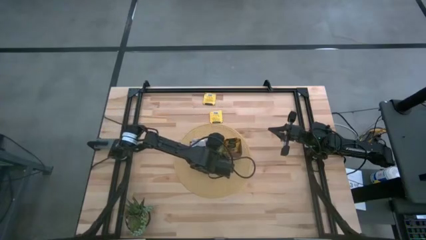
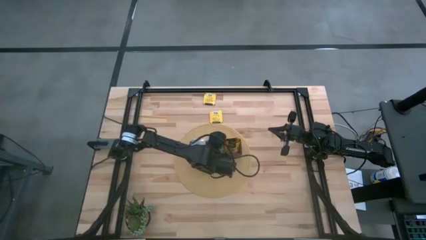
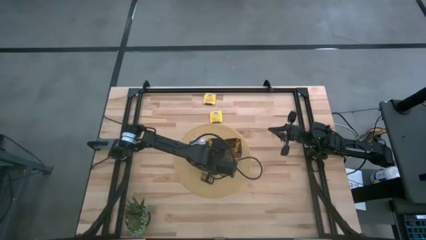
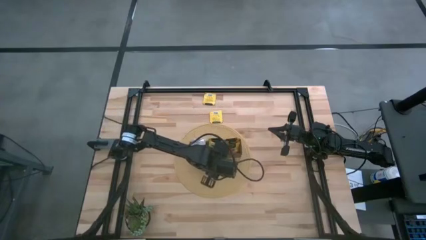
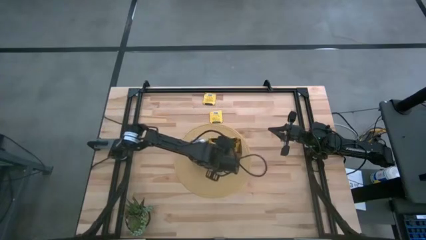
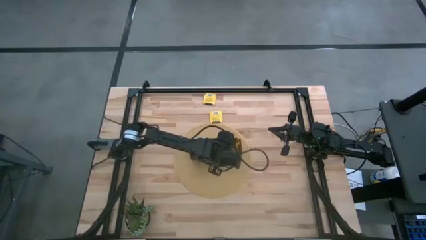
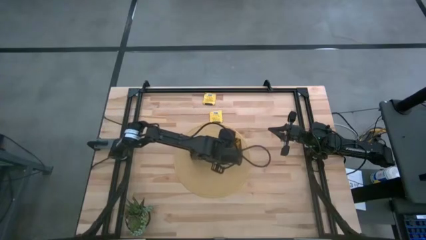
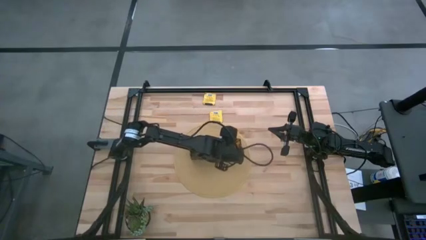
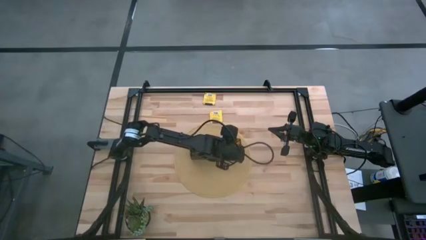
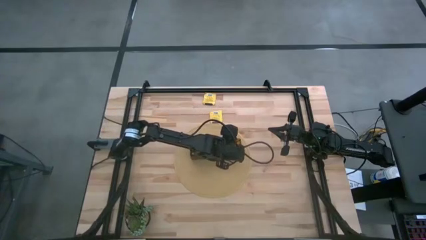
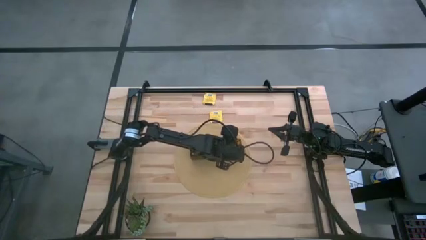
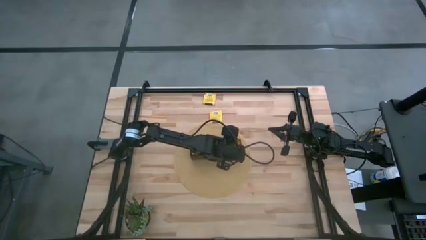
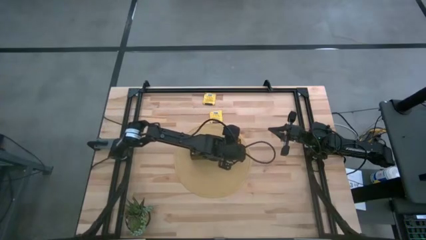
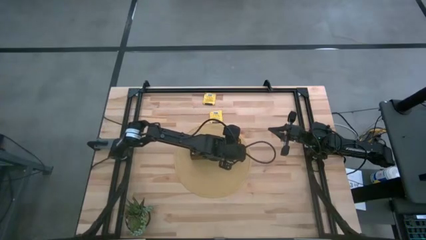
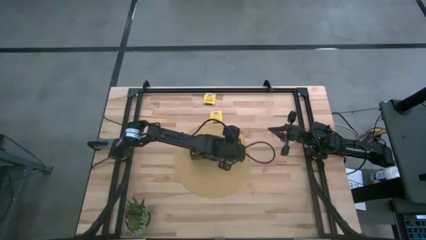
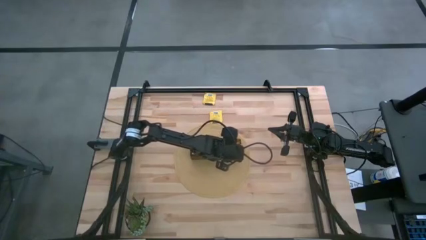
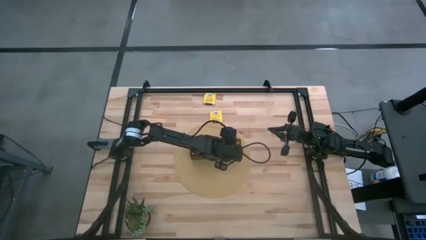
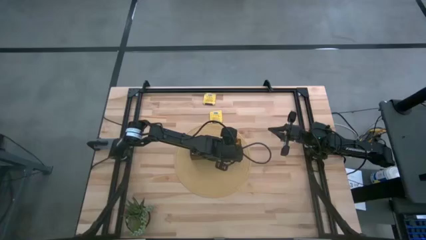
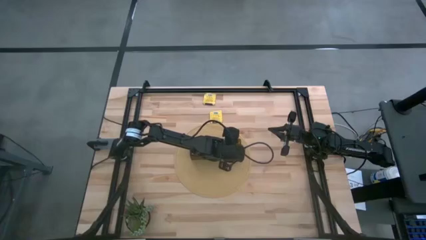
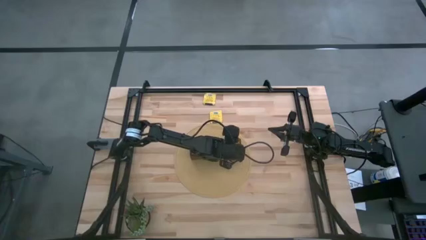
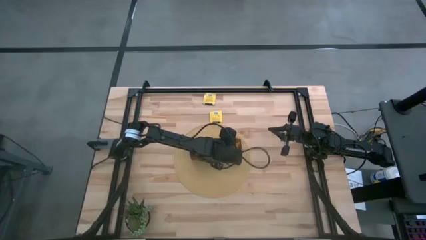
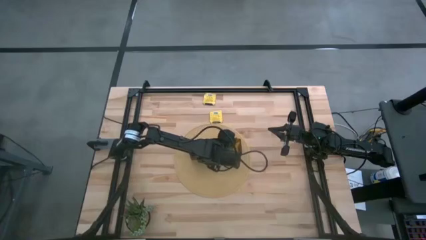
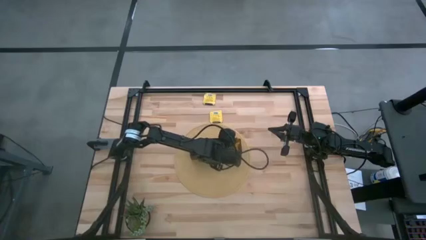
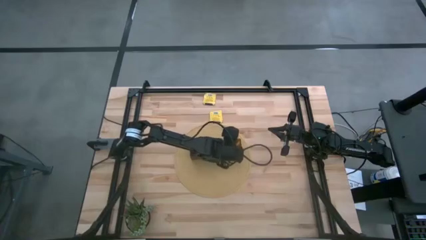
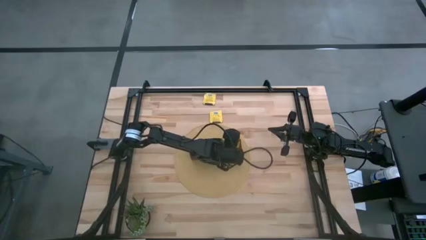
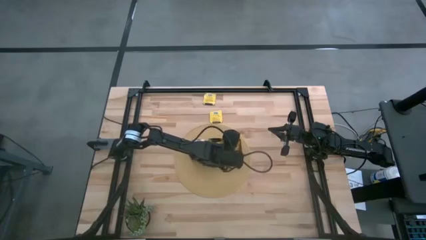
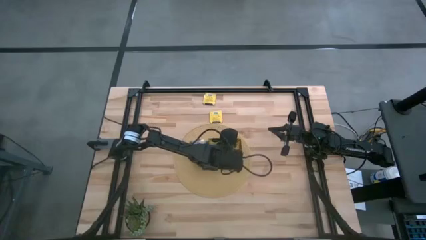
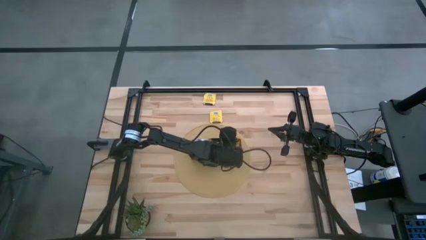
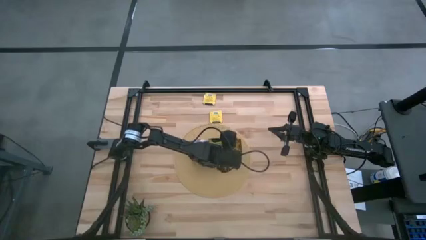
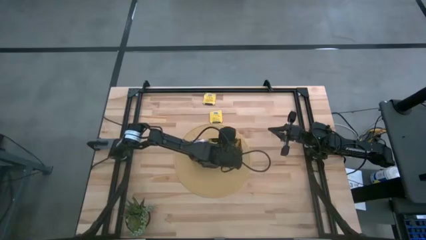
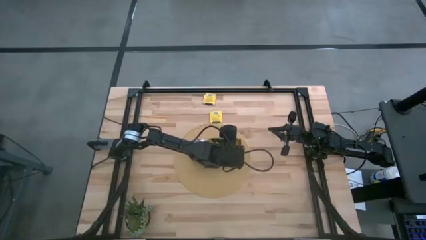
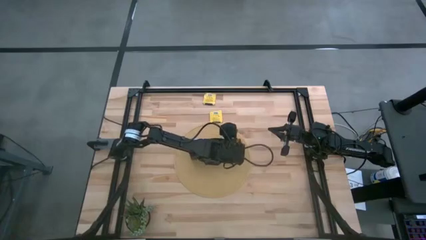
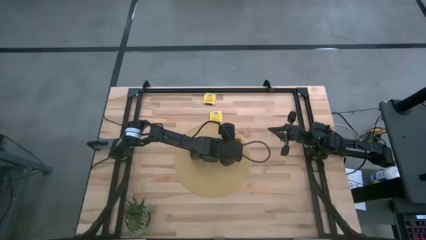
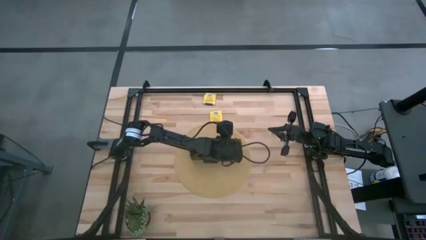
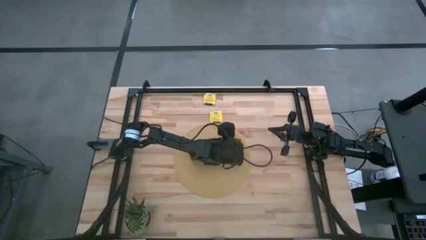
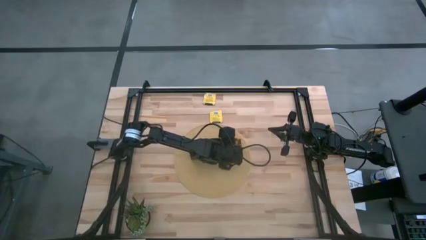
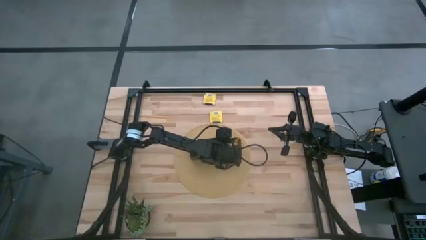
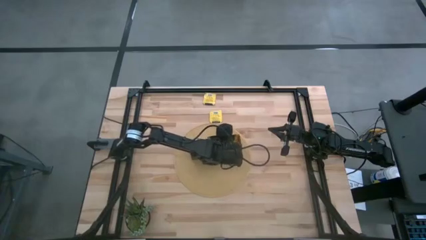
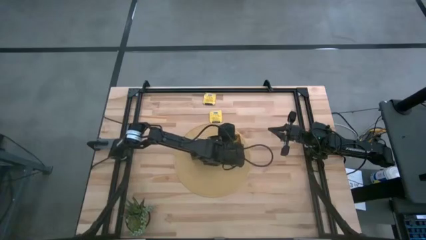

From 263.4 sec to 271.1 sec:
Task: Pick & Place Tea
Adjust the orange and green tea bags in the wooden organizer

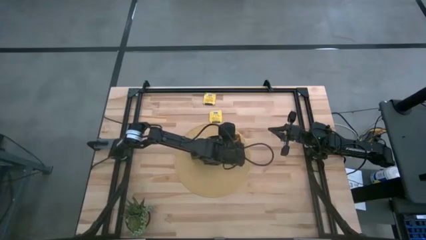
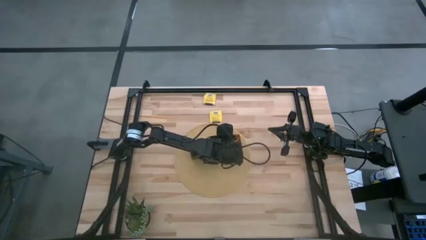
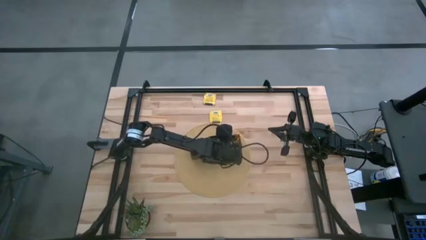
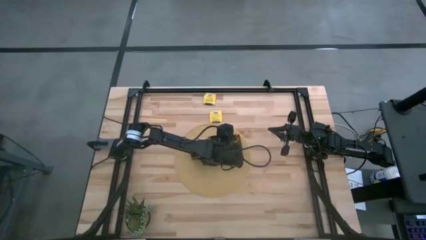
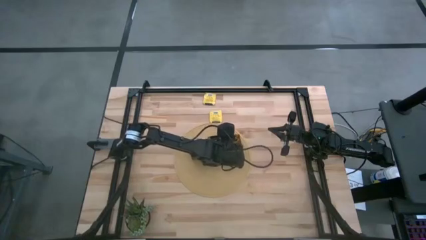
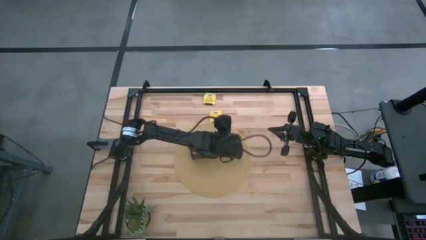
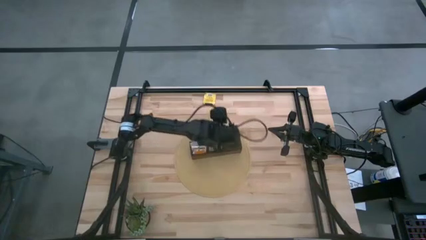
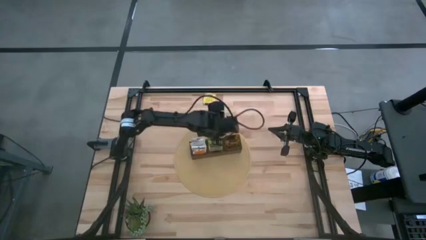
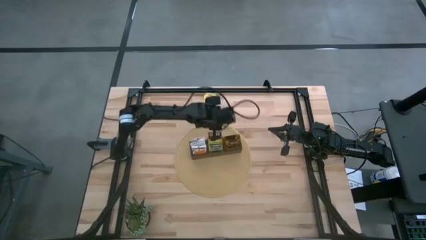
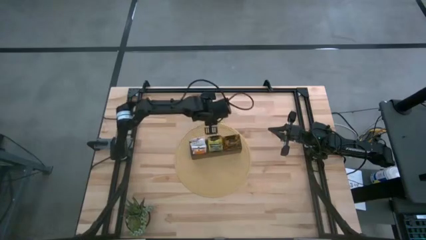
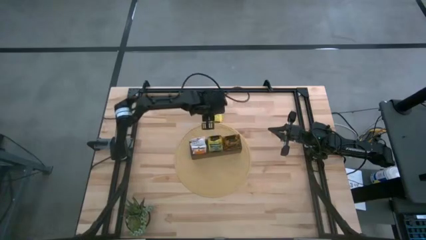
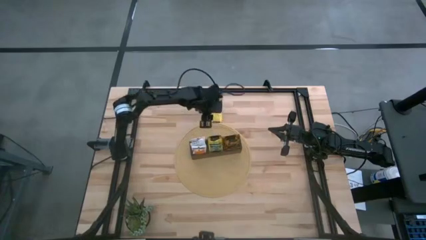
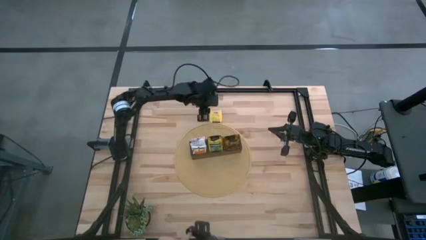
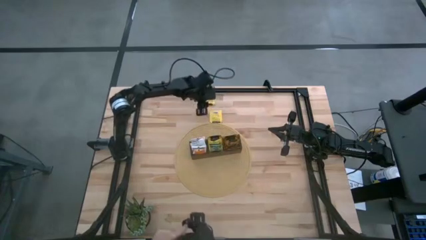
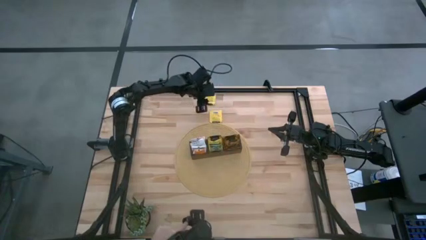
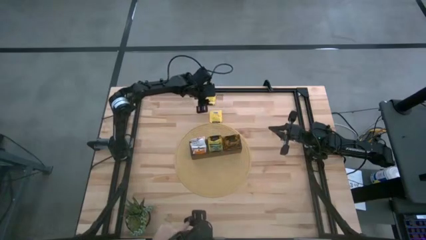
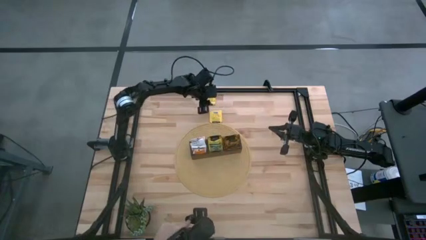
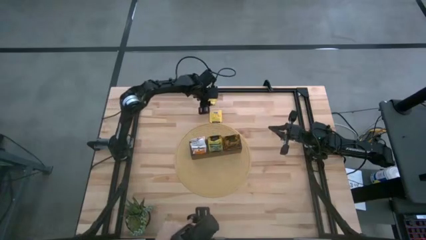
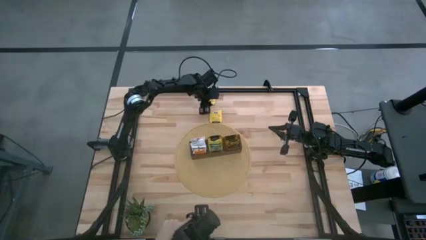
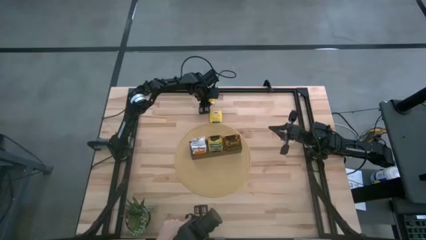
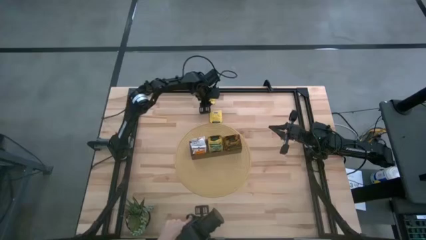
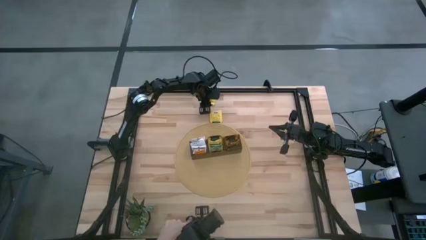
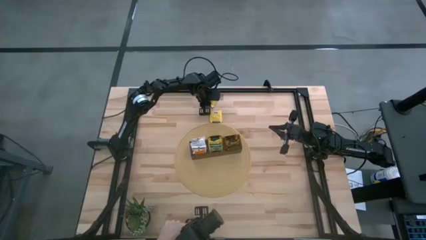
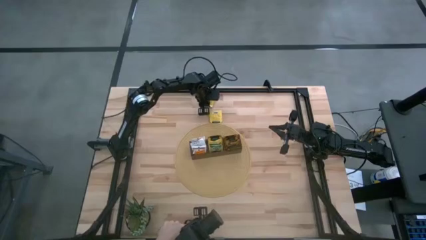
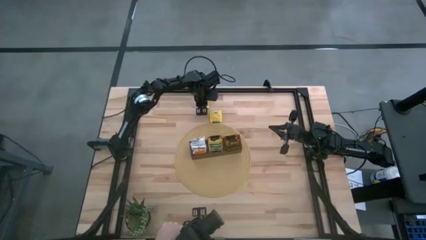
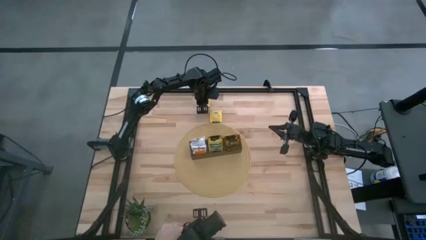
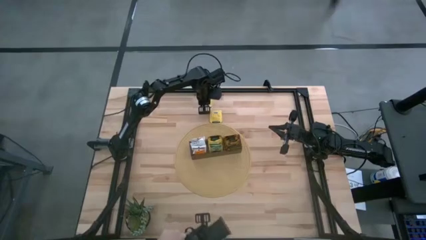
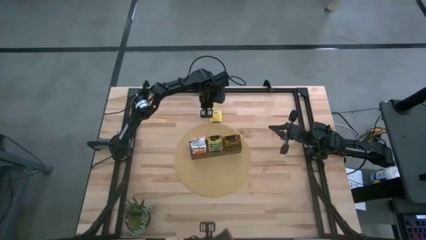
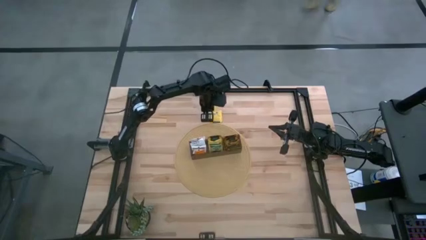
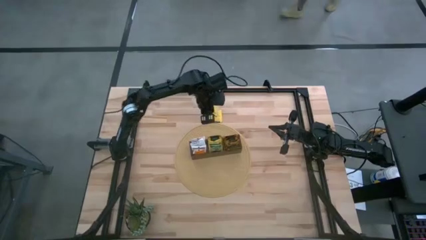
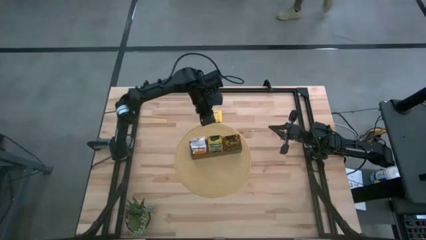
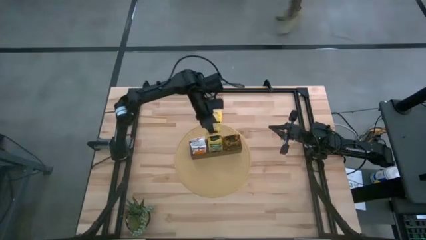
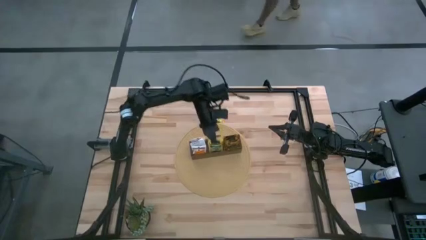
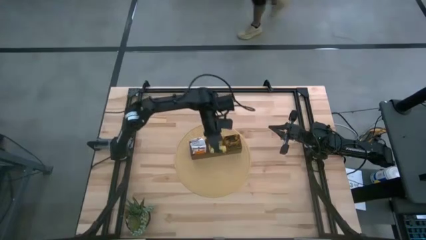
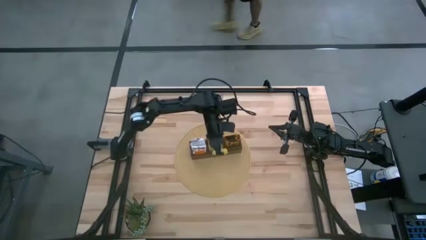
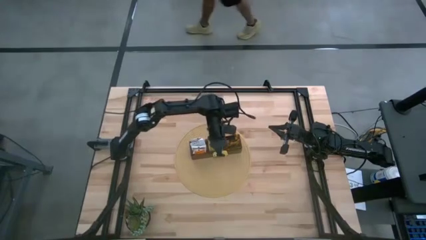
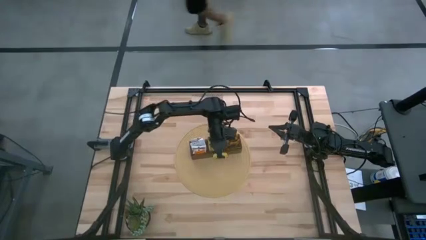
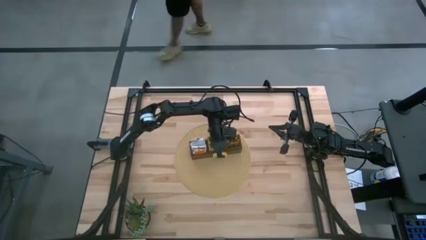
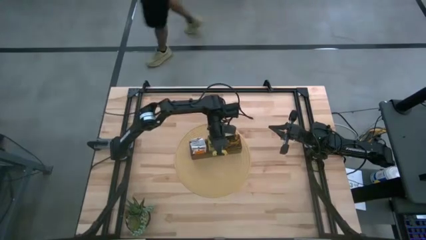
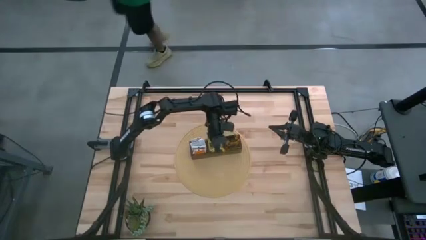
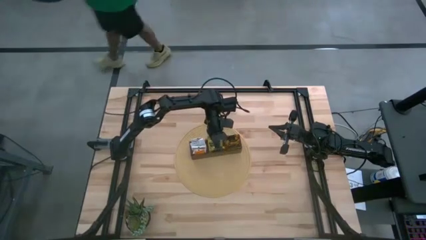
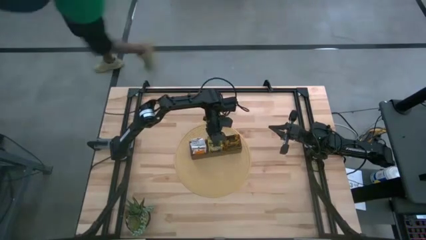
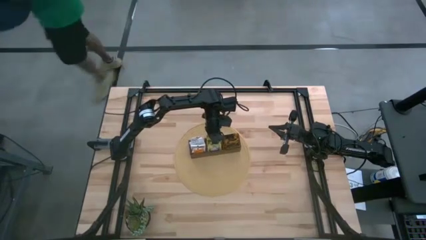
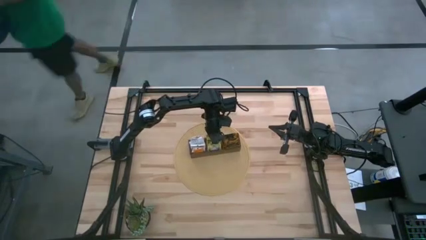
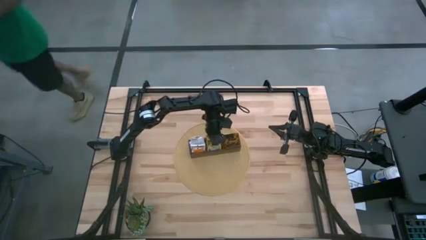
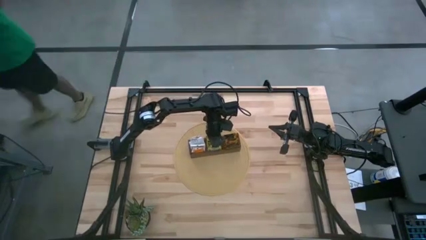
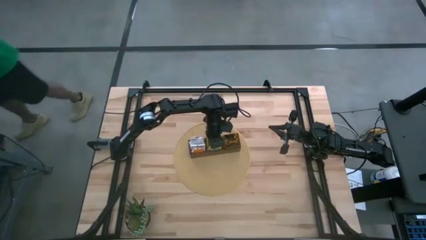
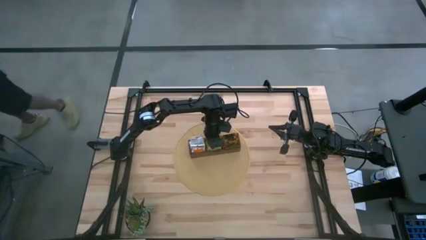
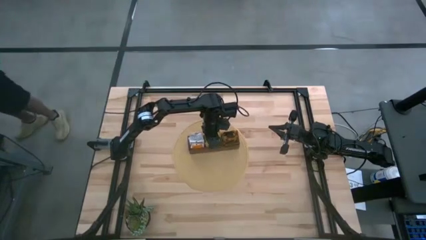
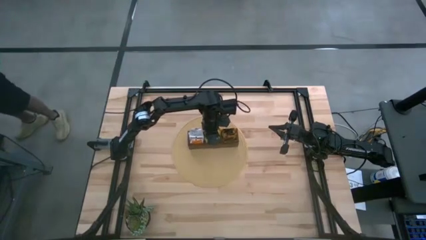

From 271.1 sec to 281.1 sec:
Put the yellow tea bag into the wooden organizer
